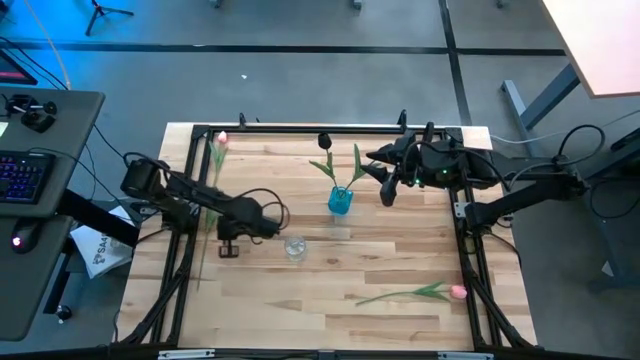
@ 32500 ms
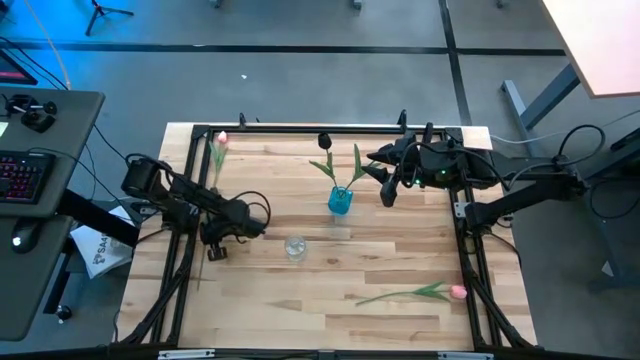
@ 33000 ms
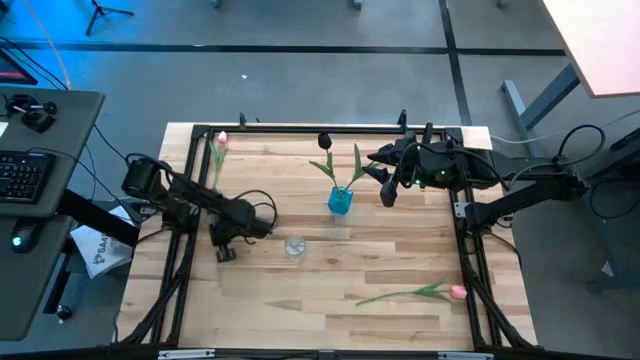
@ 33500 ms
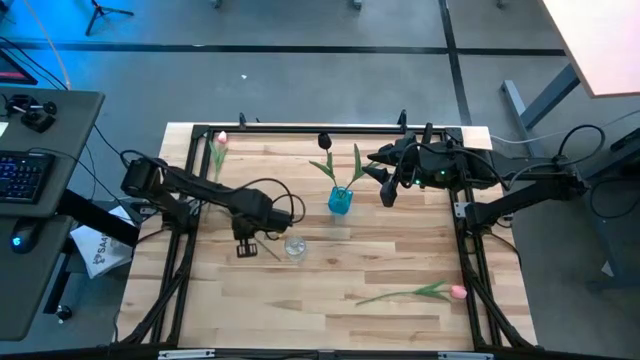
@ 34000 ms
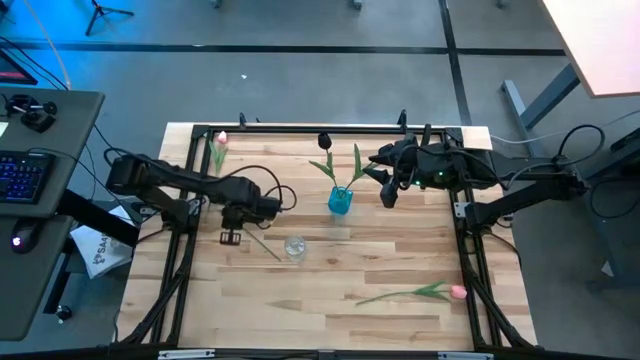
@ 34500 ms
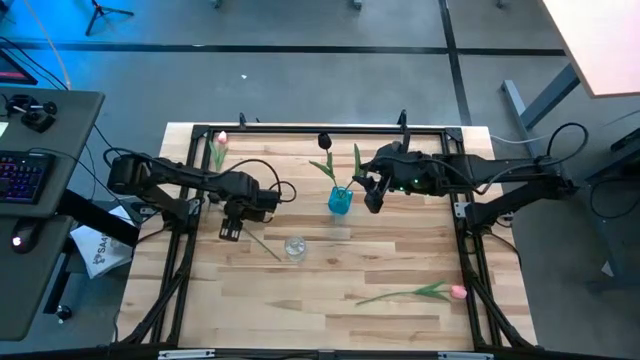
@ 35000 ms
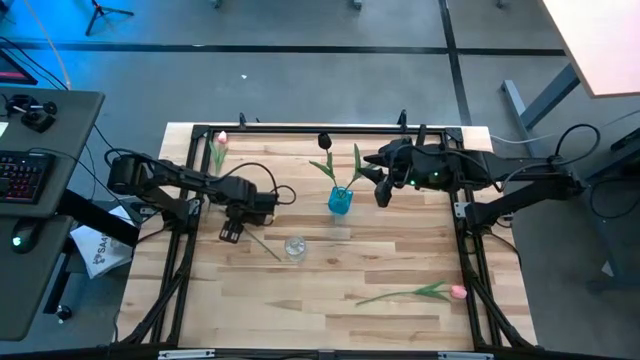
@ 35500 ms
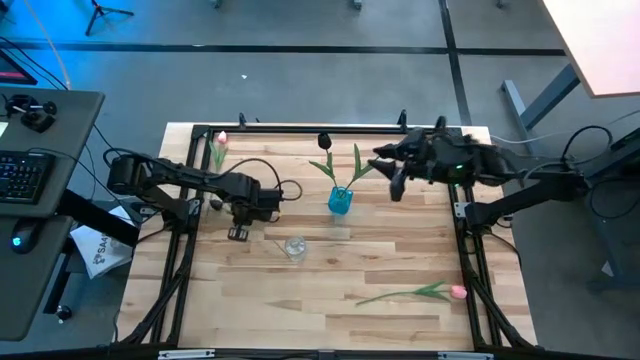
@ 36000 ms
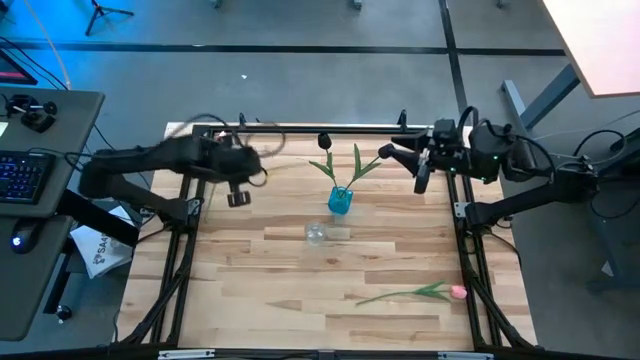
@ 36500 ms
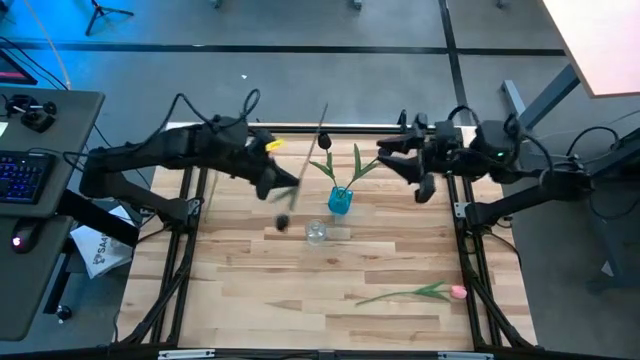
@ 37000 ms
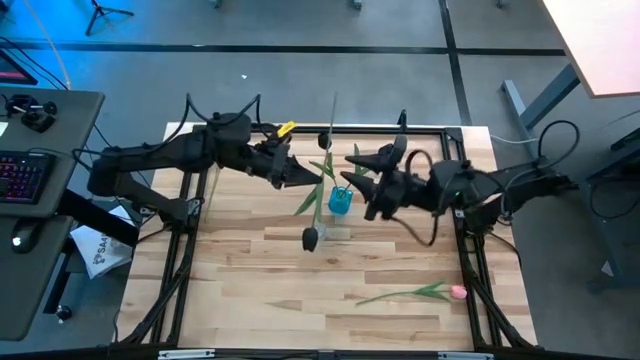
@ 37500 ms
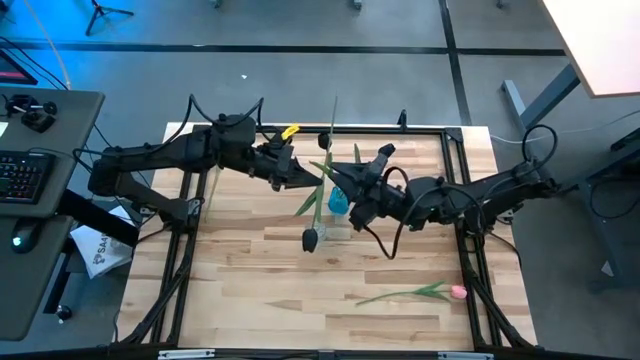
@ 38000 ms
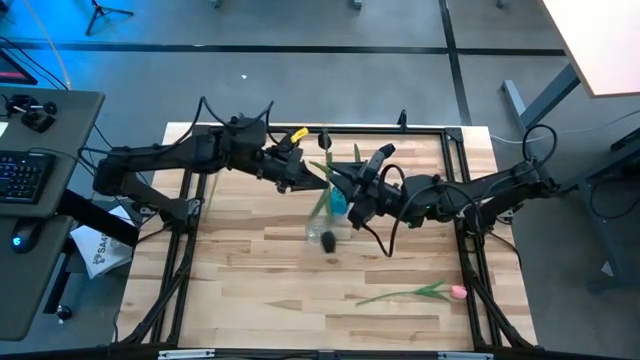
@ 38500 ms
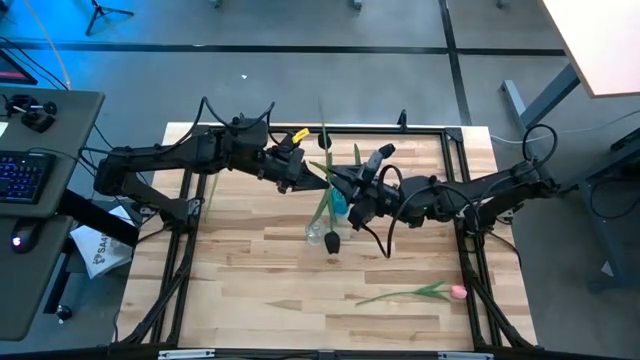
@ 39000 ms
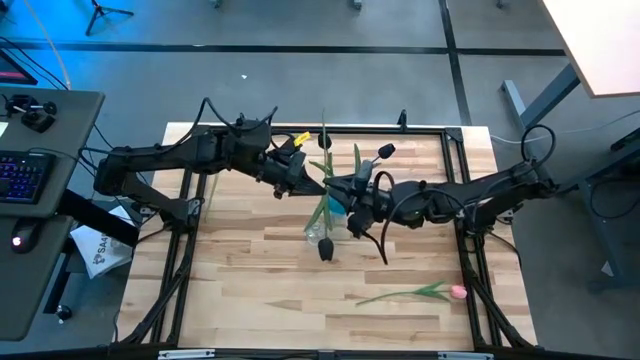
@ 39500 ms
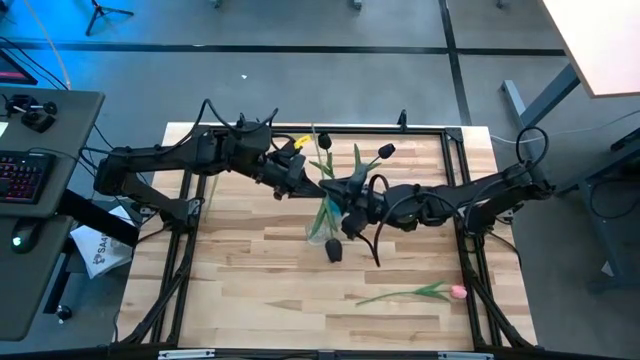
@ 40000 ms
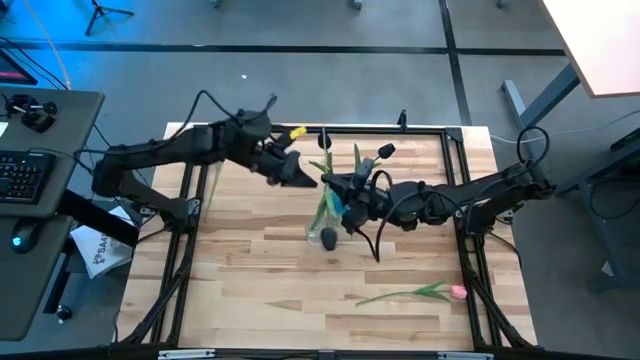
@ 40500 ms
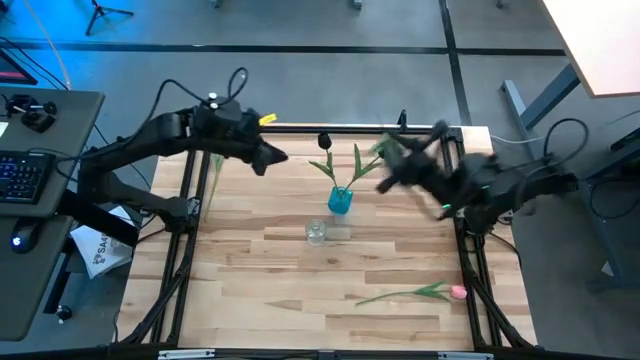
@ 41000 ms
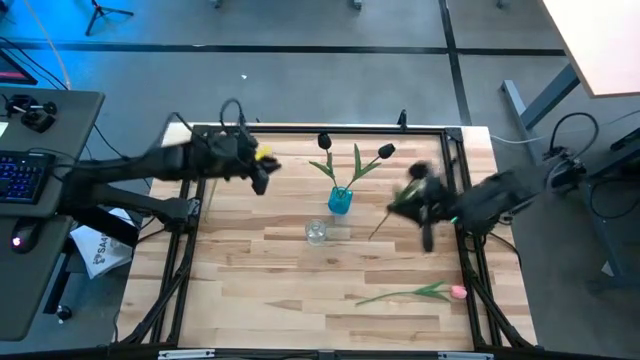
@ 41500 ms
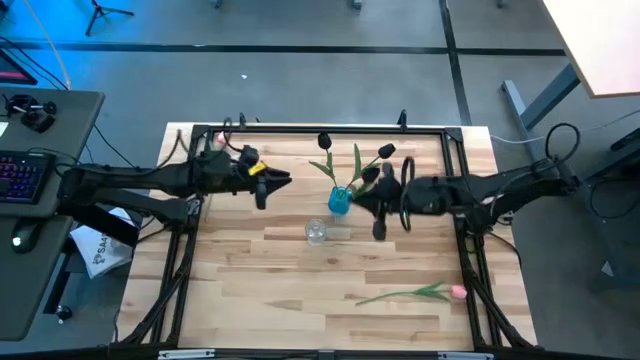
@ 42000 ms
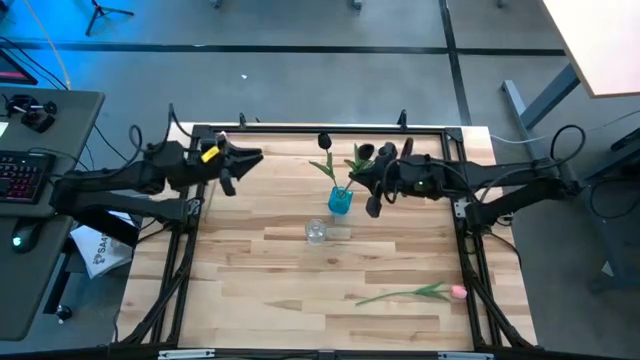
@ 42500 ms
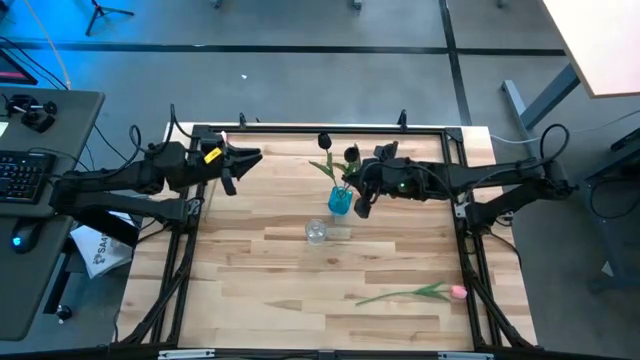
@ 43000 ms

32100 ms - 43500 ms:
Task: Sort flowers into vase by color
Put the black tulip into the blue vase

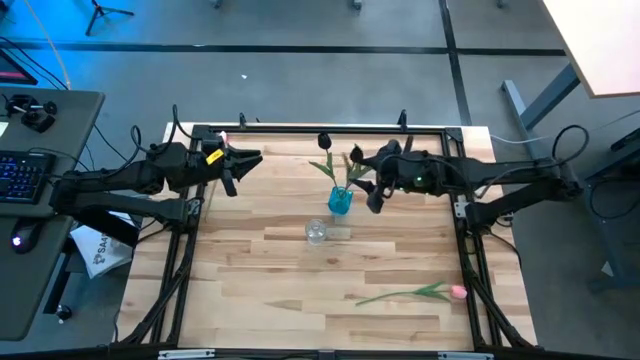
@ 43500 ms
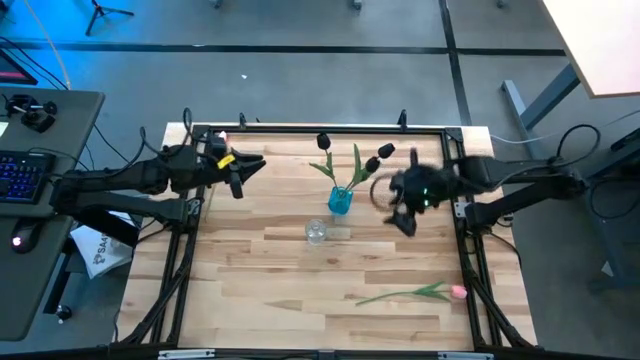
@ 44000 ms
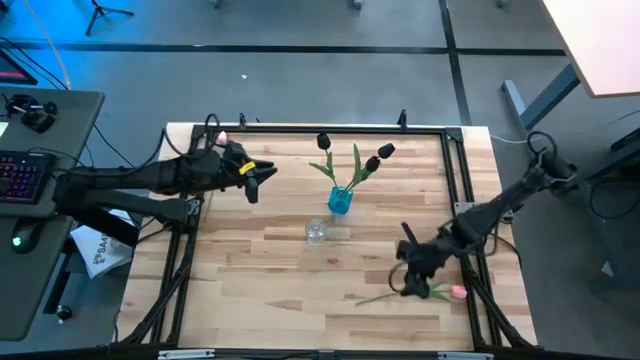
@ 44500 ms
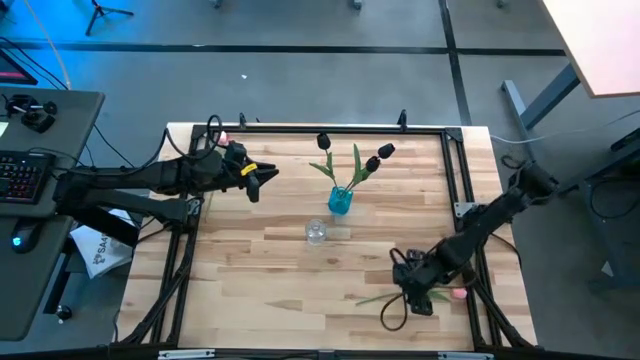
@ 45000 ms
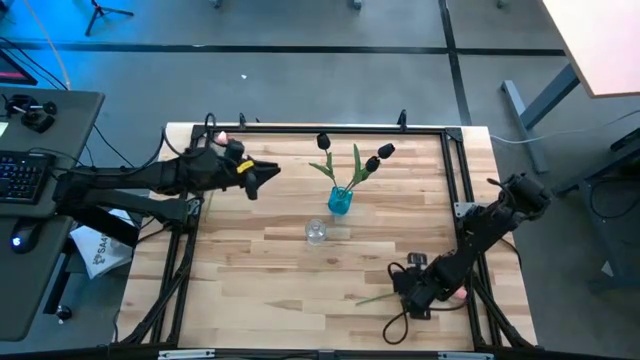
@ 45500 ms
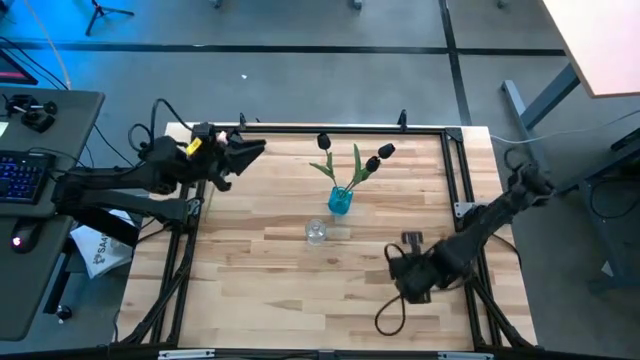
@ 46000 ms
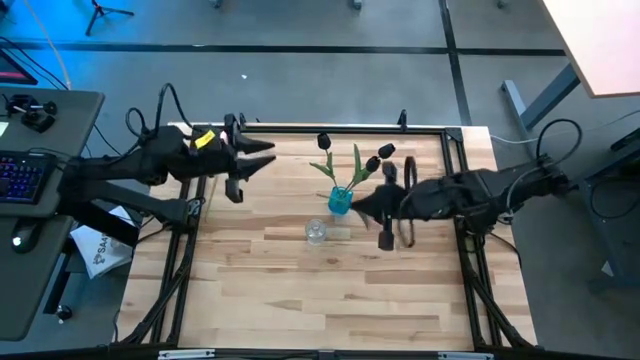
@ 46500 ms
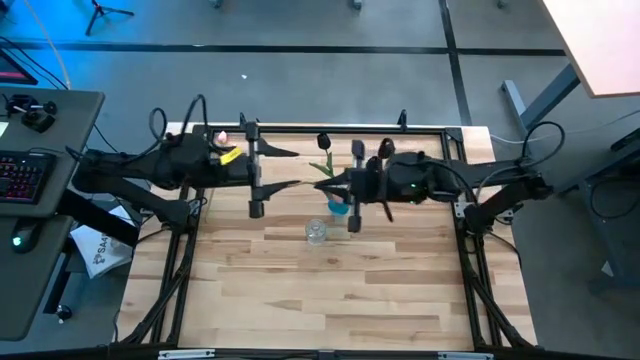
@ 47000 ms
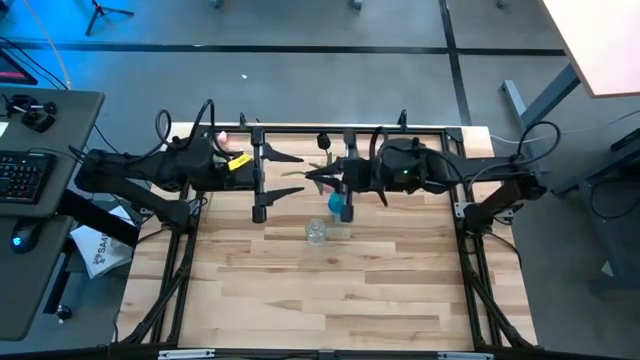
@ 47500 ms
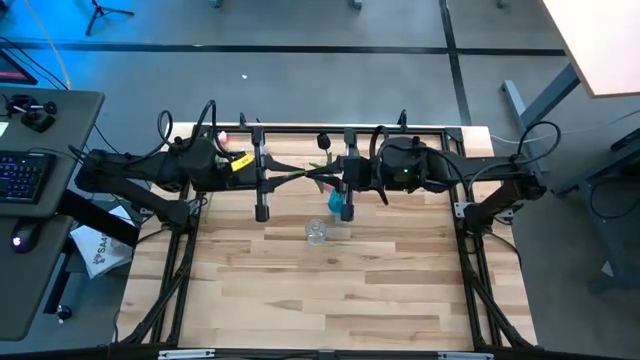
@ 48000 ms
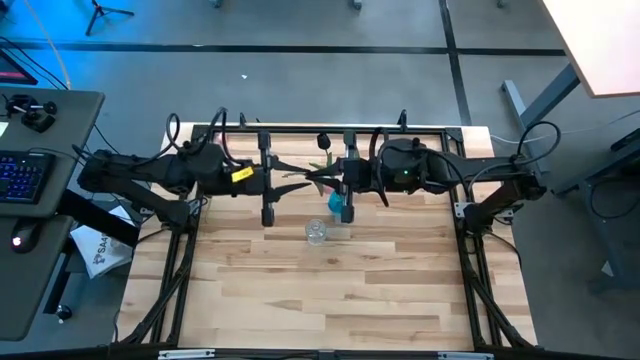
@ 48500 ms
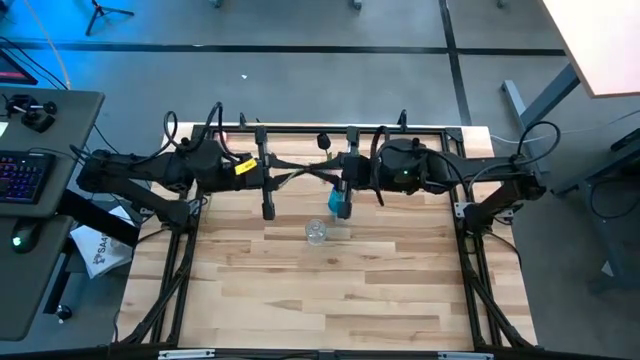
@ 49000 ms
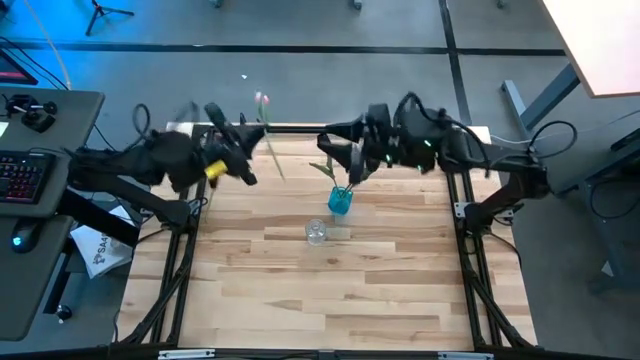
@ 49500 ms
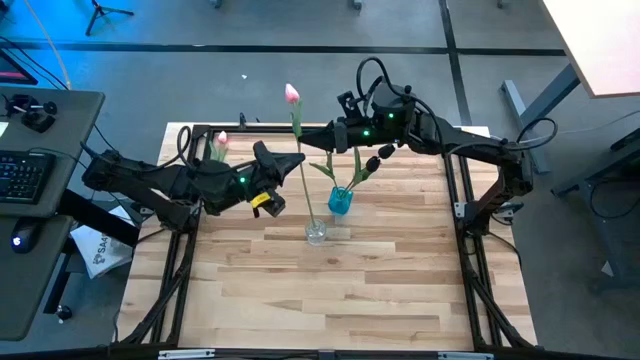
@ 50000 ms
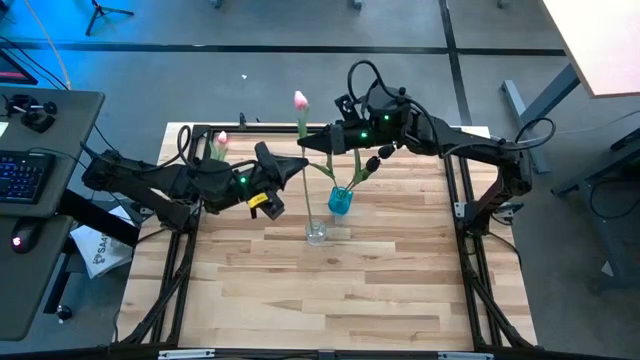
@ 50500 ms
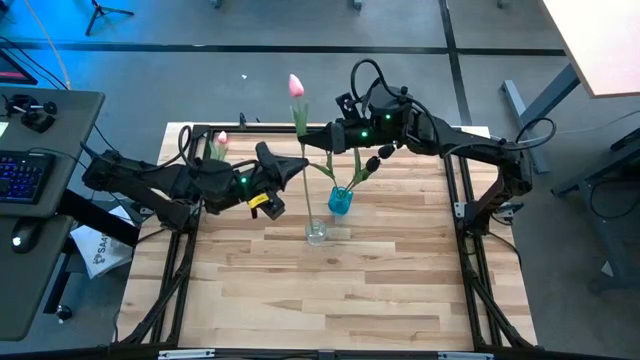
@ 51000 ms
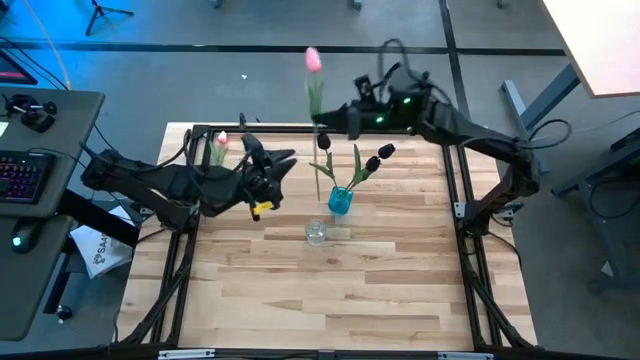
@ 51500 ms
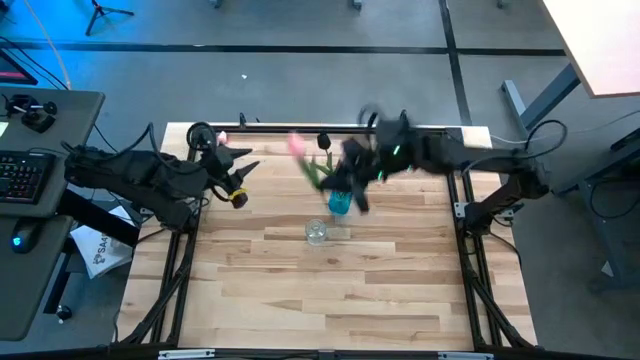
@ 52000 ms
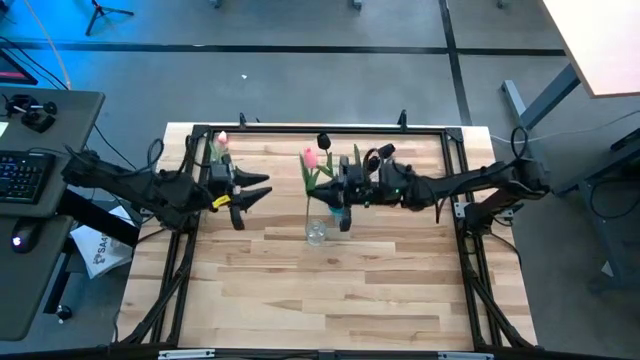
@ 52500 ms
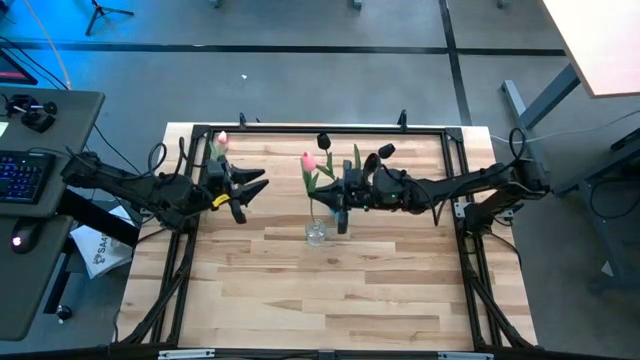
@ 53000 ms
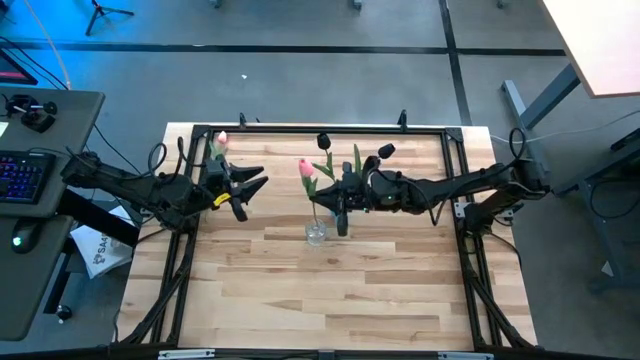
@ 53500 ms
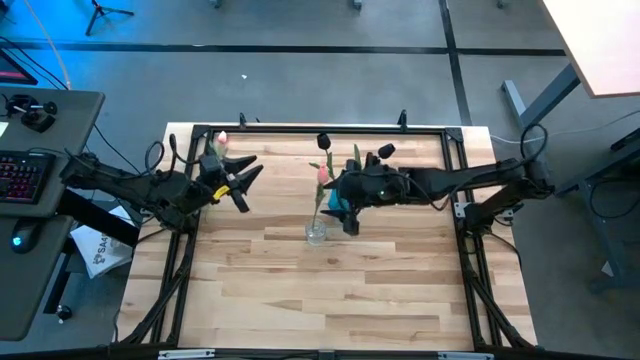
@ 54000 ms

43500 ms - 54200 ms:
Put the bottom pink tulip into the transparent vase
